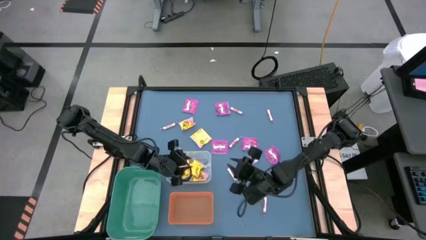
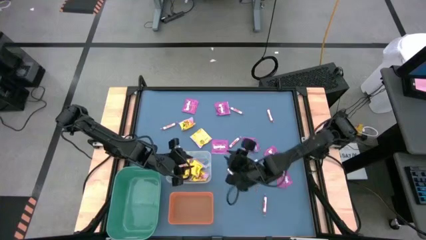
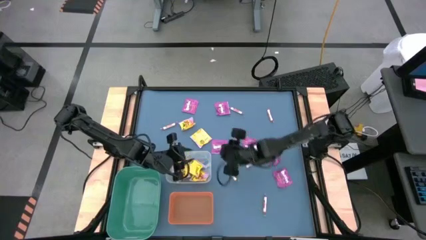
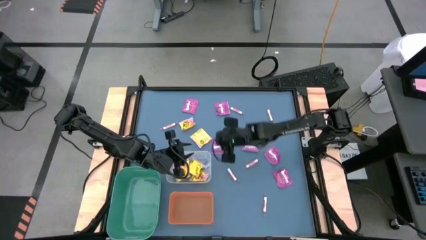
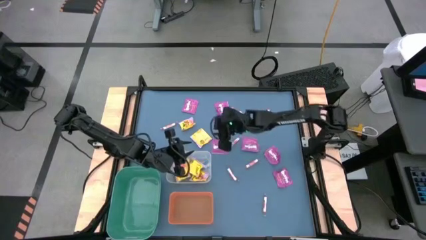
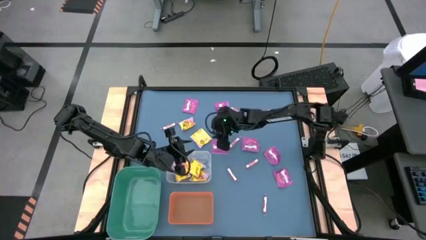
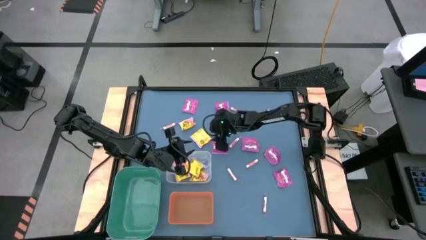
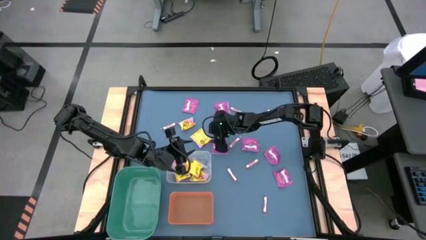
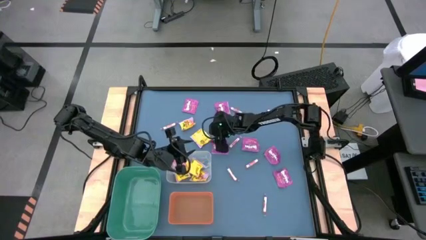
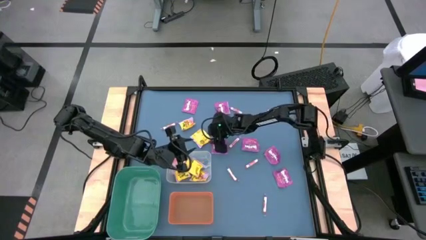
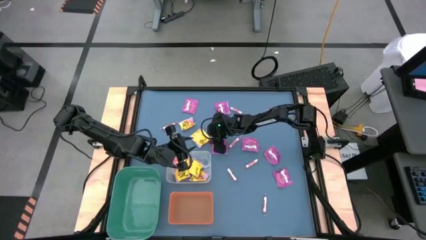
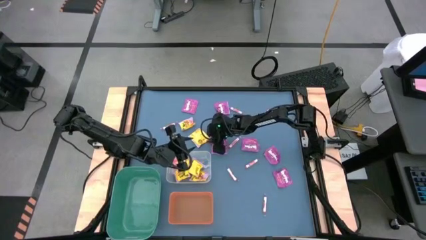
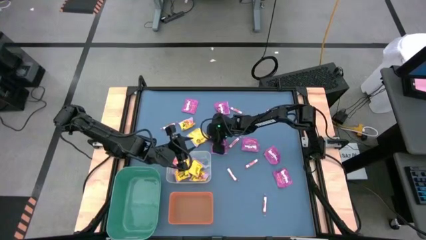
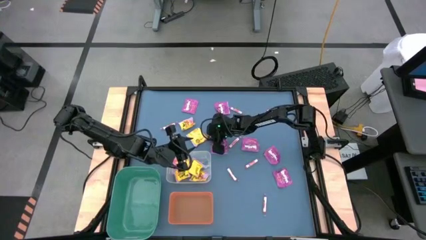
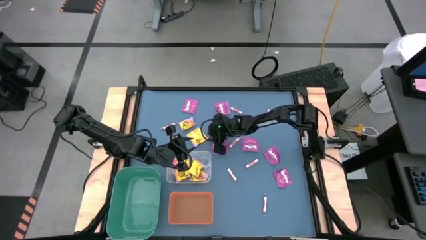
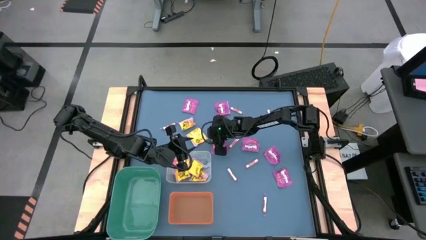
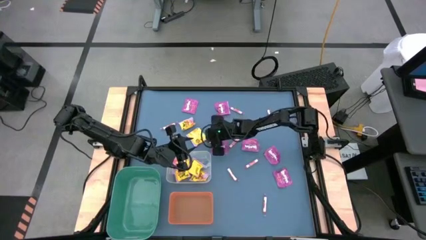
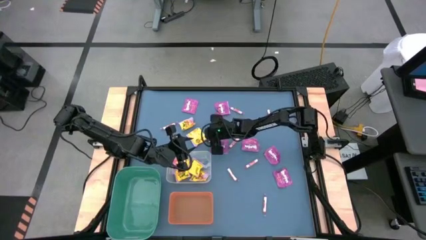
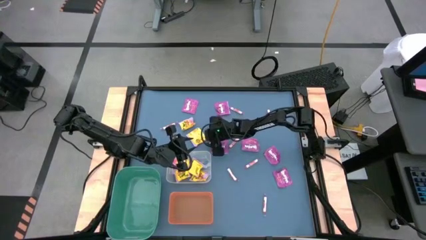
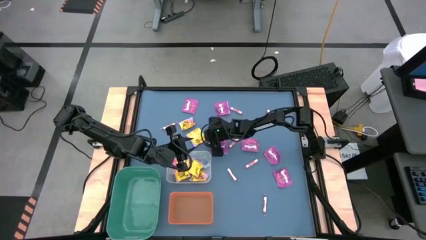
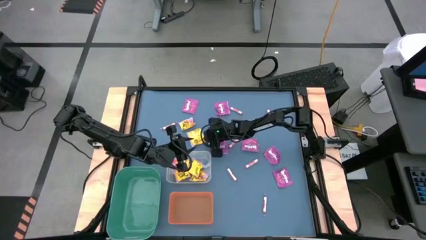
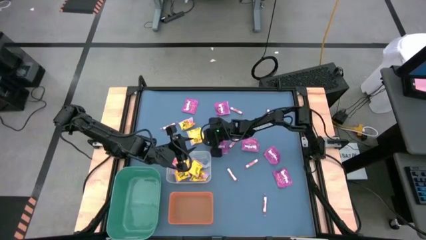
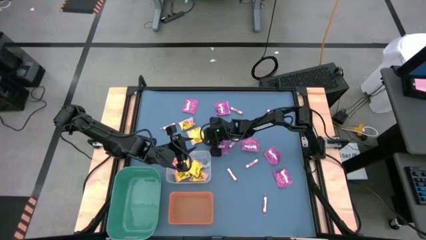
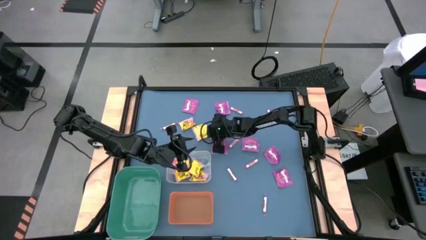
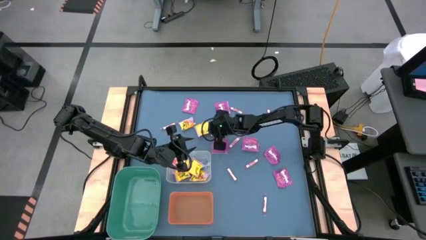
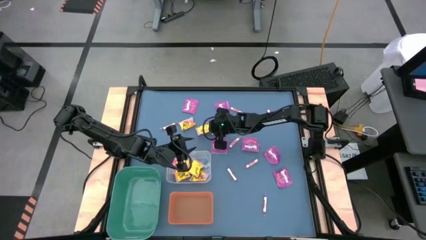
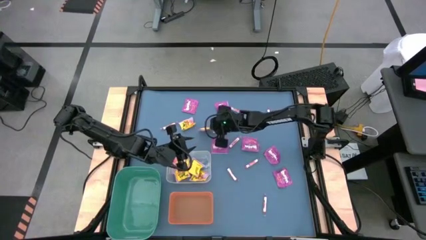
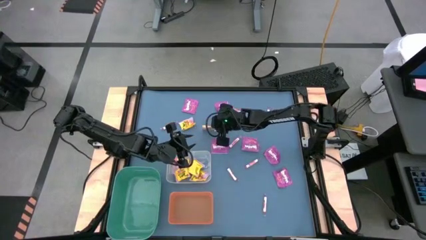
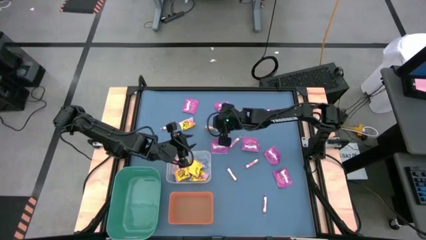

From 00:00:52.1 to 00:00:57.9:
Task: Sort candy
Put the yellow candy into the transparent bin

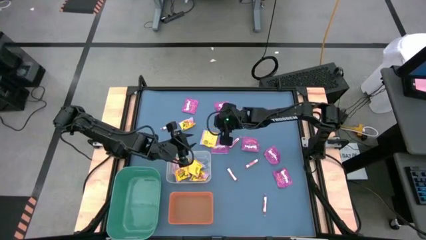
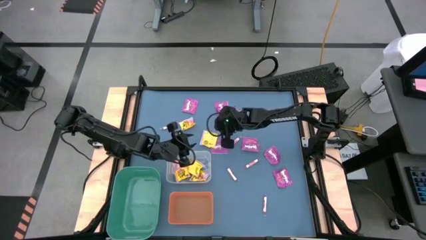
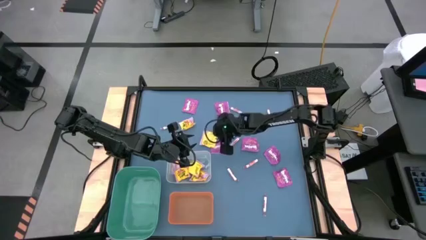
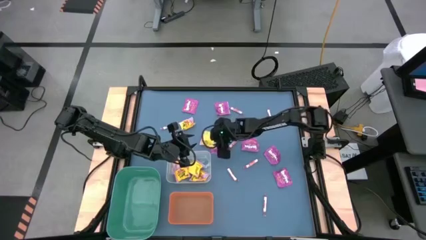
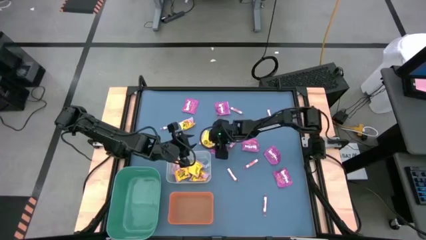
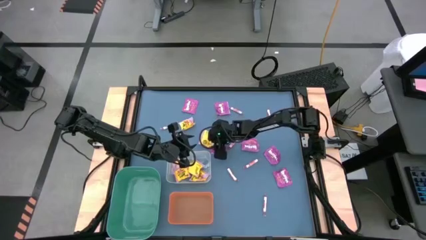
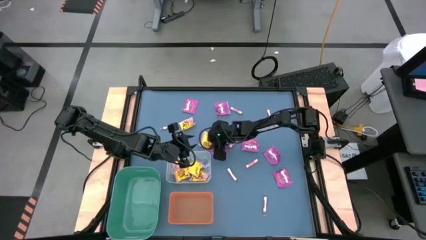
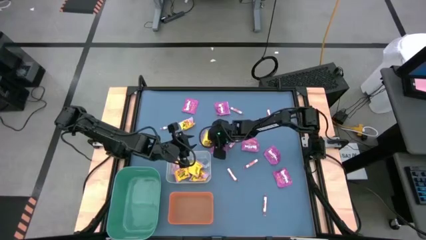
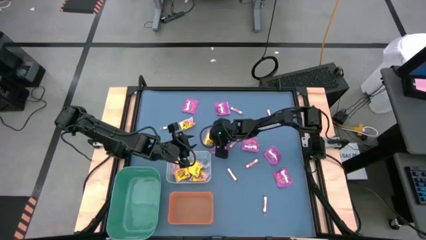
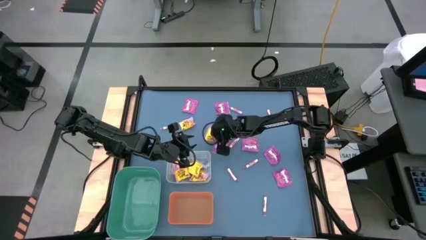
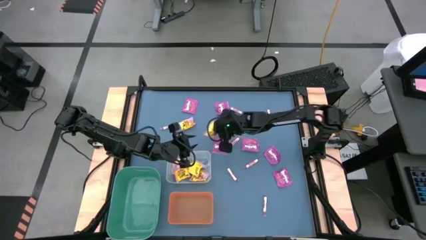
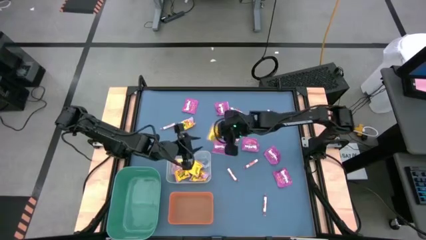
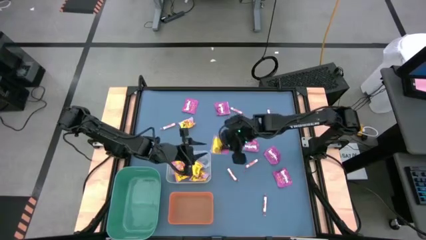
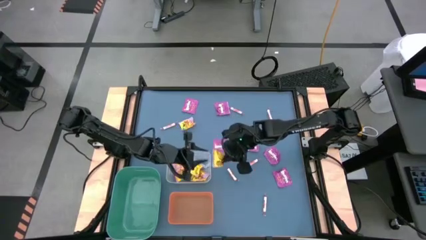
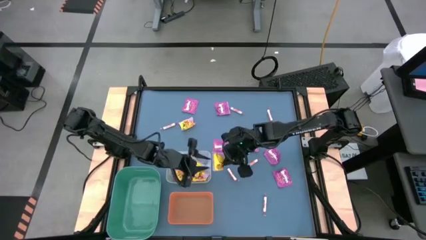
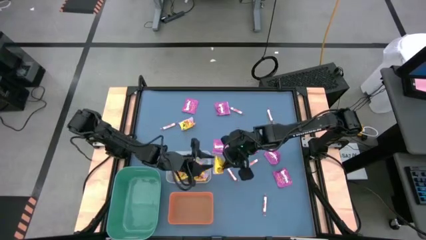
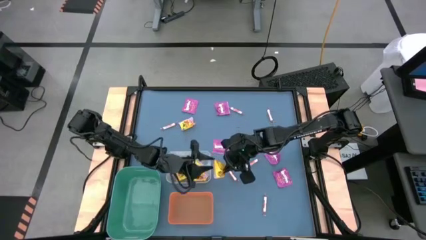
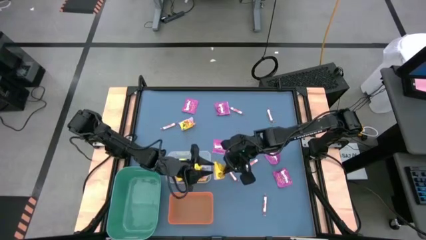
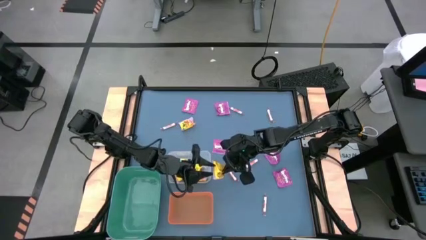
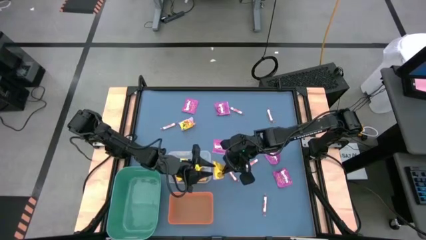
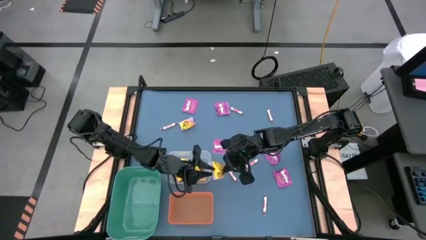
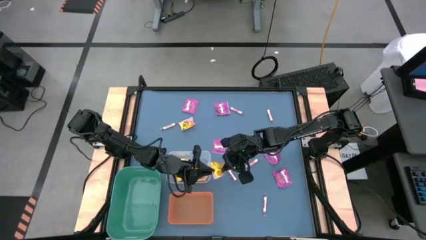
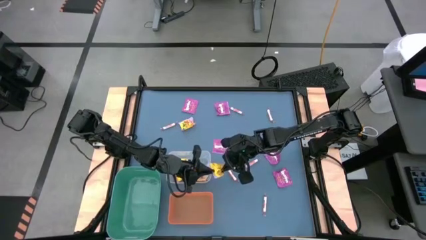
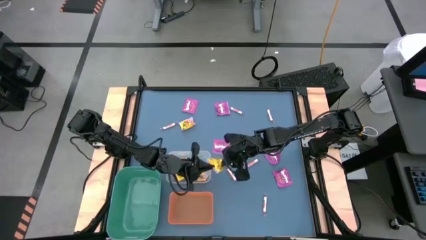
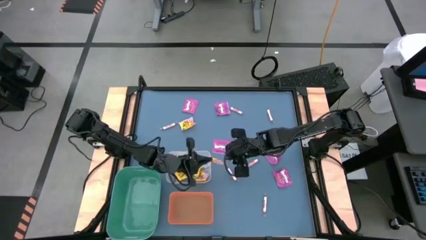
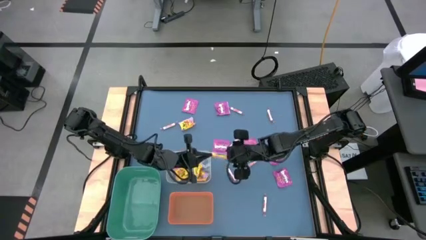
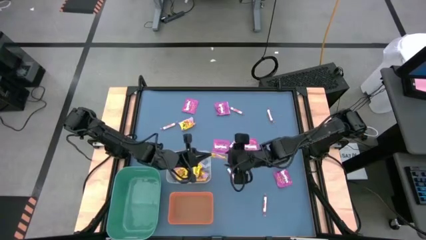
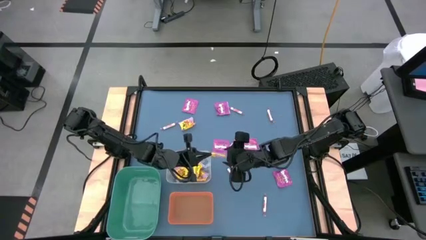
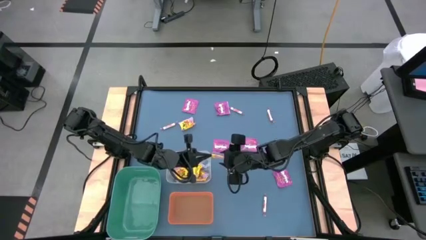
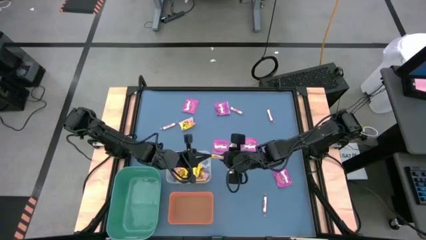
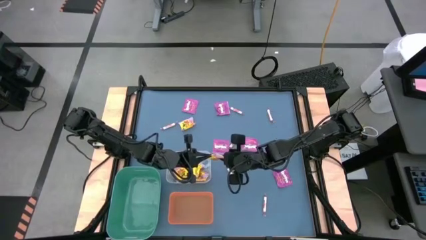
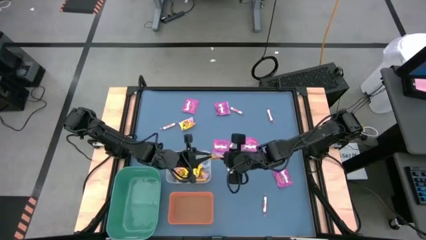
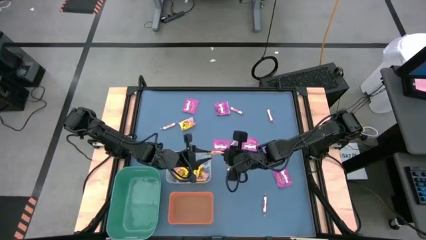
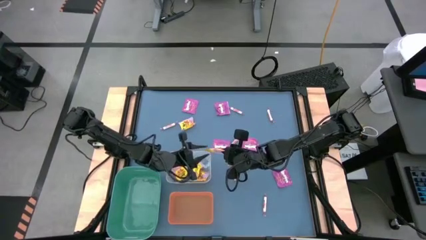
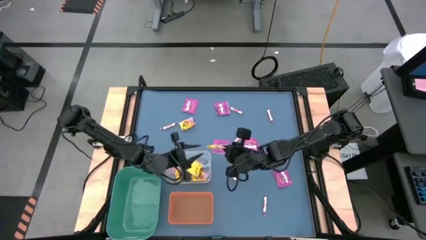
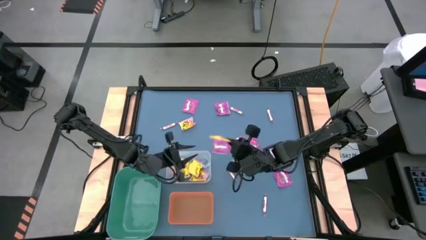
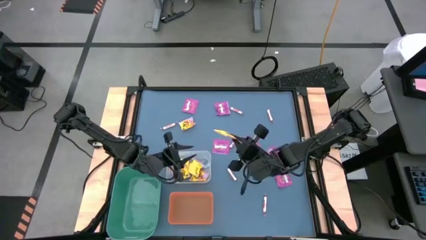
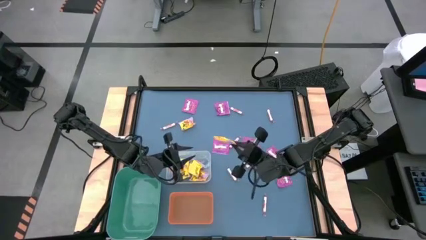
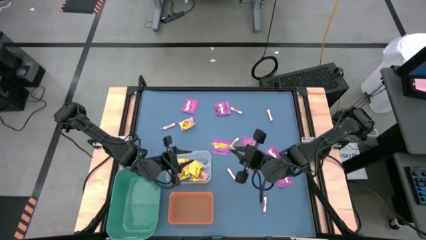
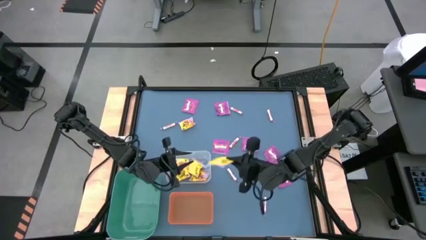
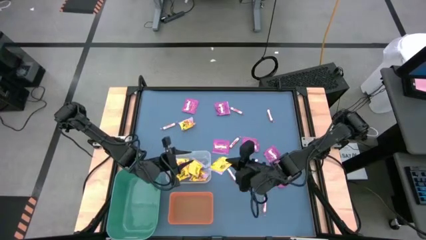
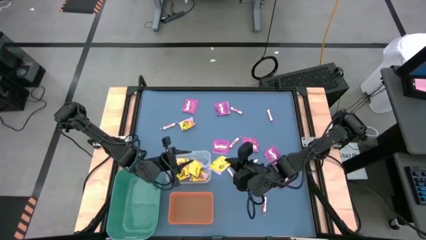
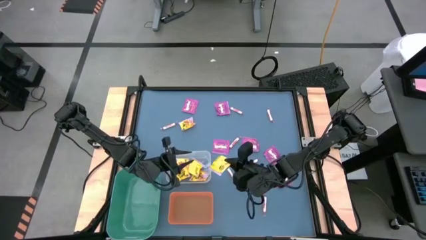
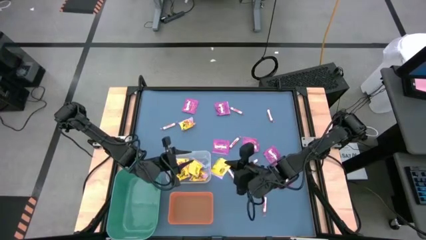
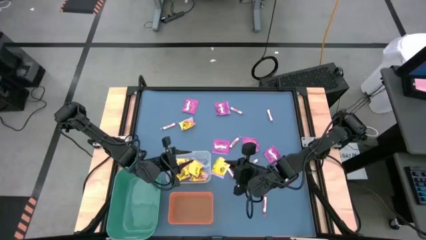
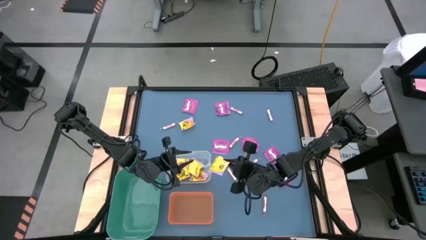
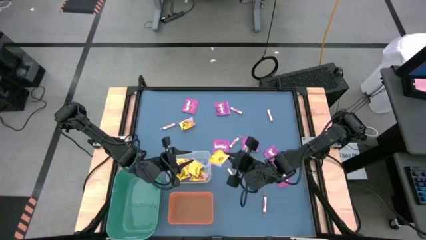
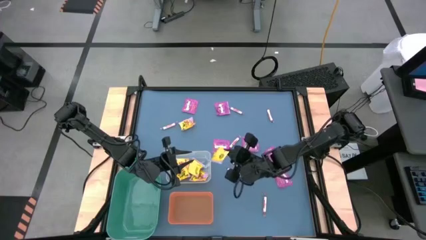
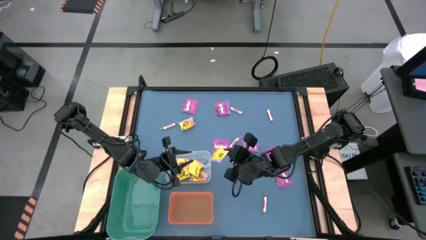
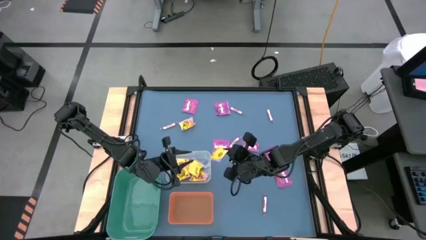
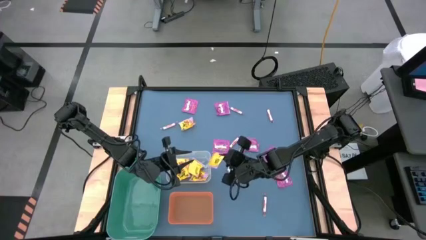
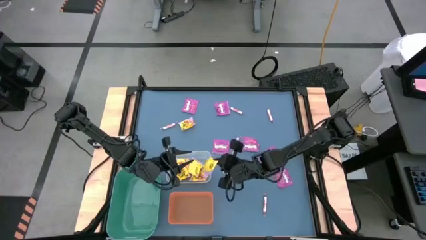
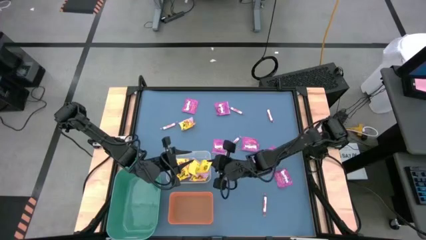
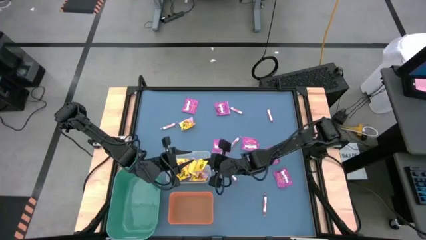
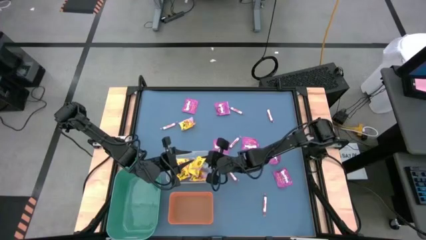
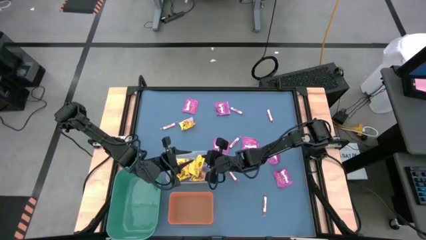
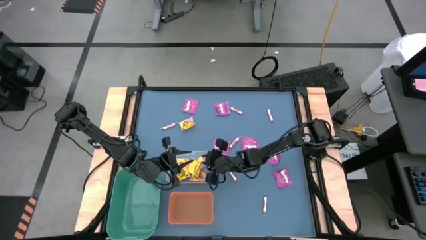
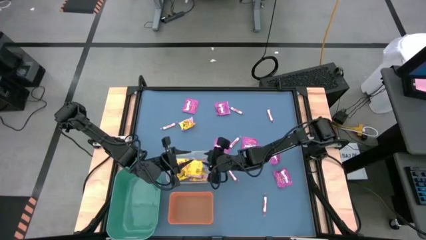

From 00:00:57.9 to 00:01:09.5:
Put the yellow candy into the transparent bin
